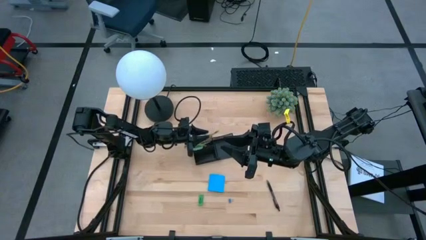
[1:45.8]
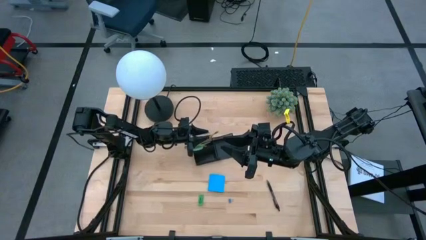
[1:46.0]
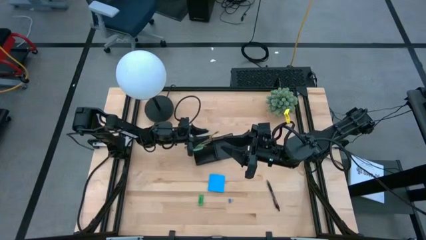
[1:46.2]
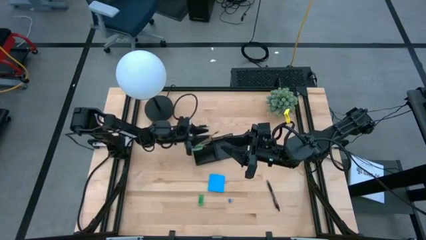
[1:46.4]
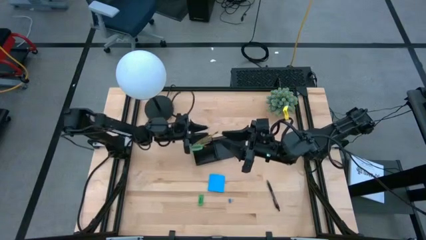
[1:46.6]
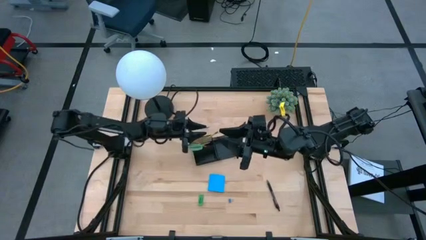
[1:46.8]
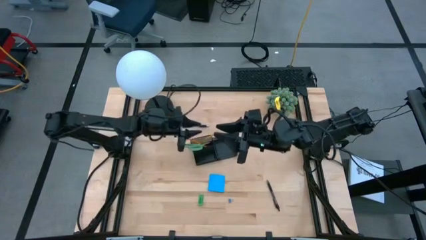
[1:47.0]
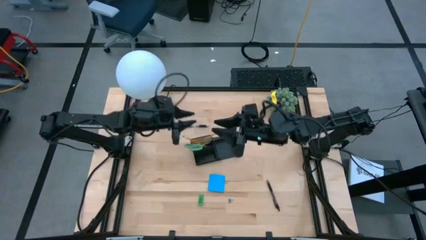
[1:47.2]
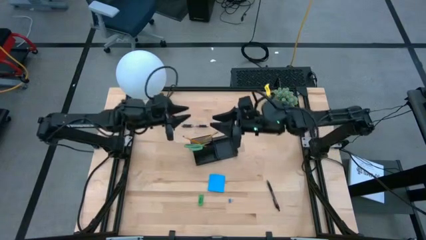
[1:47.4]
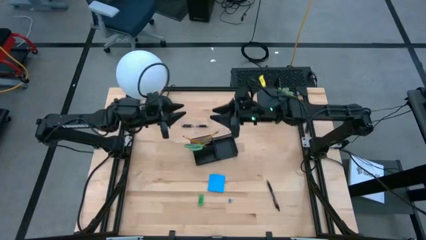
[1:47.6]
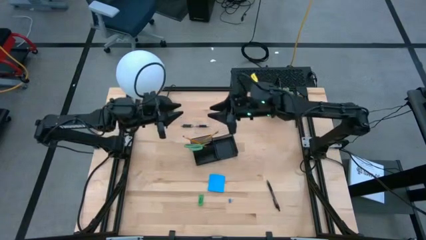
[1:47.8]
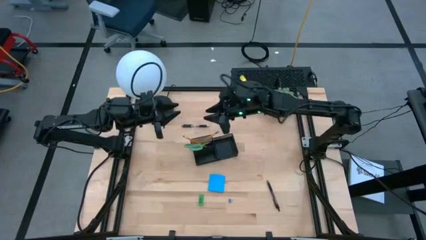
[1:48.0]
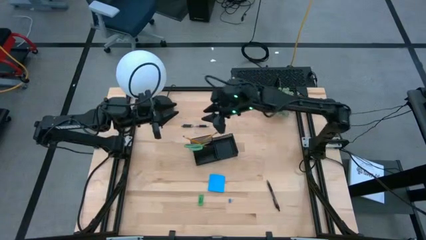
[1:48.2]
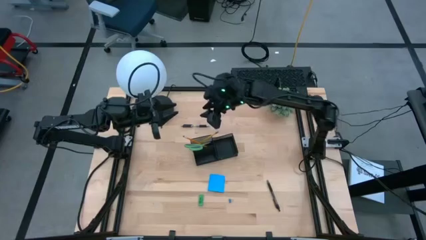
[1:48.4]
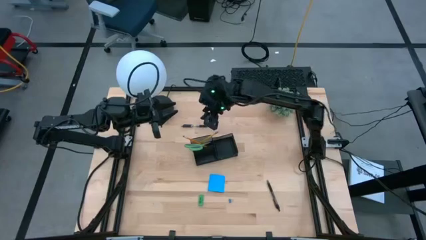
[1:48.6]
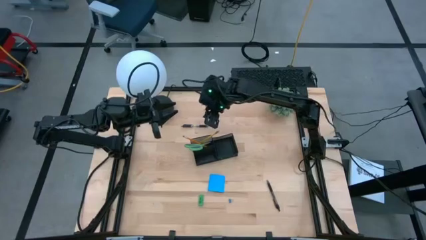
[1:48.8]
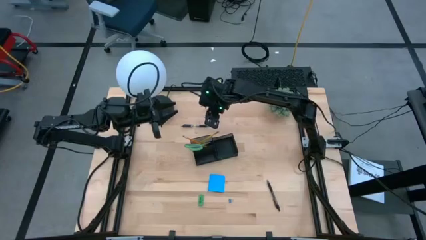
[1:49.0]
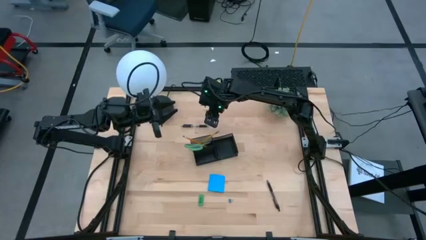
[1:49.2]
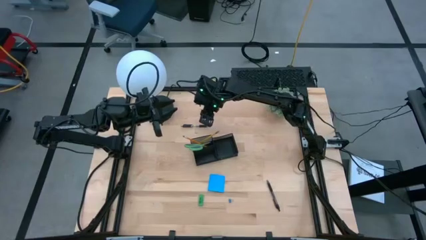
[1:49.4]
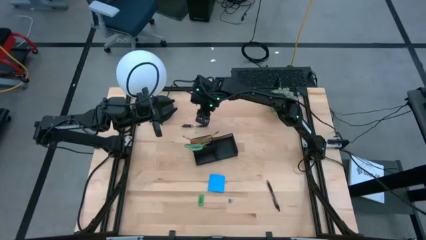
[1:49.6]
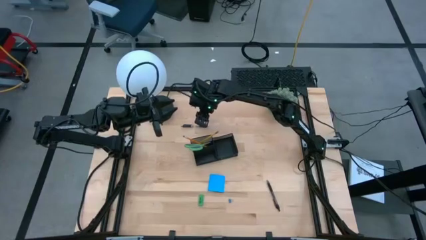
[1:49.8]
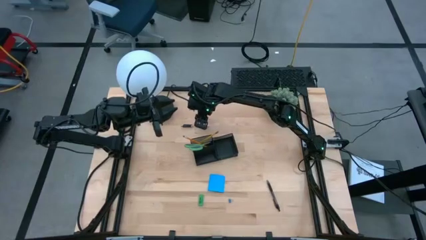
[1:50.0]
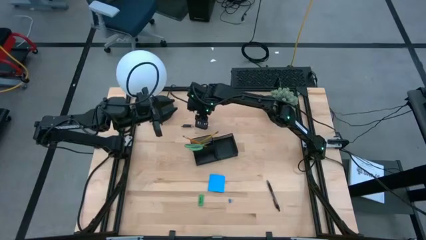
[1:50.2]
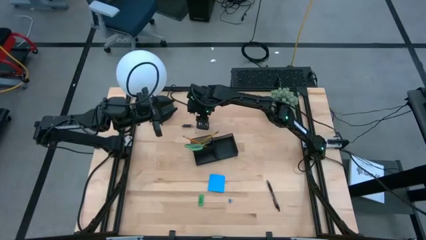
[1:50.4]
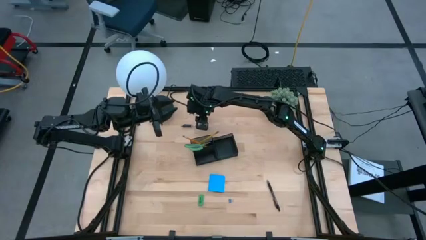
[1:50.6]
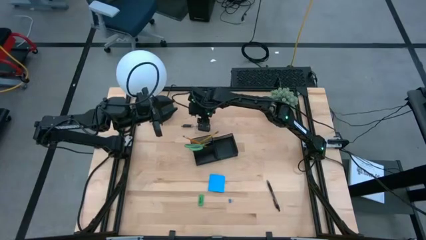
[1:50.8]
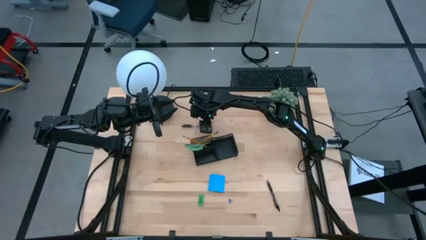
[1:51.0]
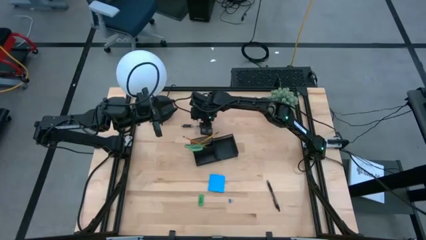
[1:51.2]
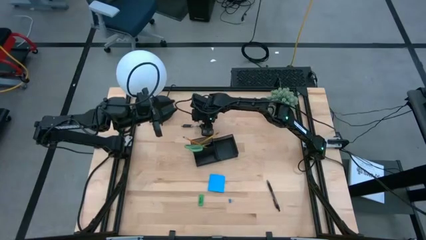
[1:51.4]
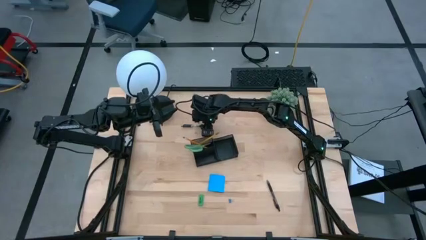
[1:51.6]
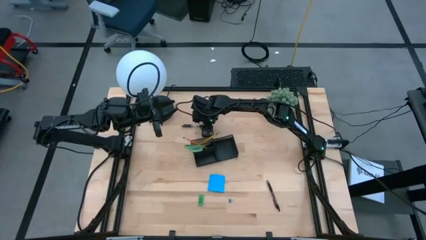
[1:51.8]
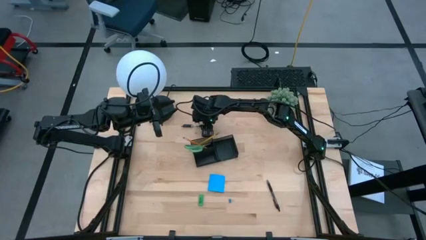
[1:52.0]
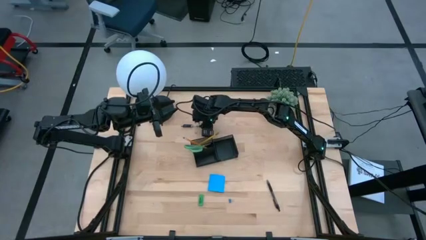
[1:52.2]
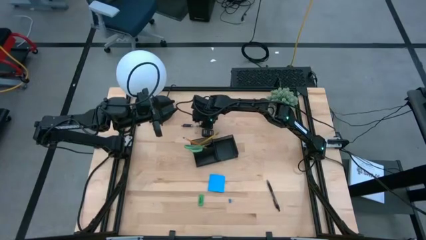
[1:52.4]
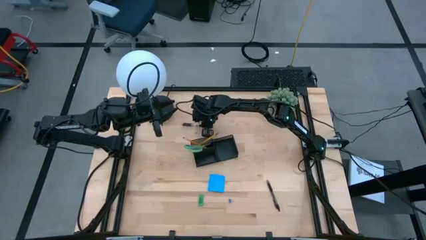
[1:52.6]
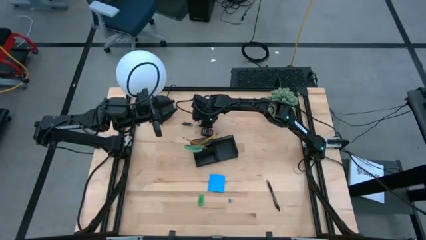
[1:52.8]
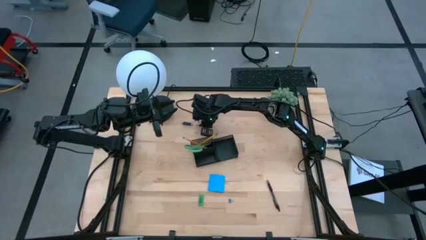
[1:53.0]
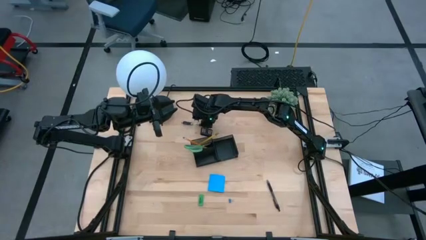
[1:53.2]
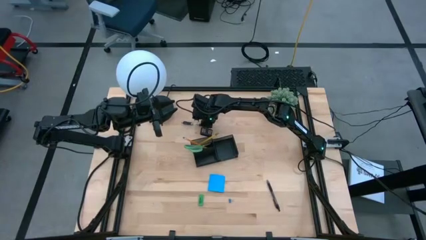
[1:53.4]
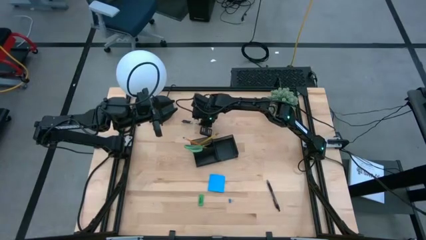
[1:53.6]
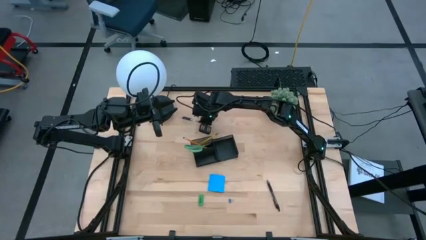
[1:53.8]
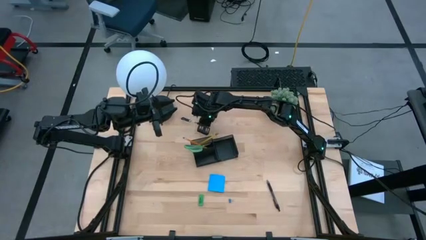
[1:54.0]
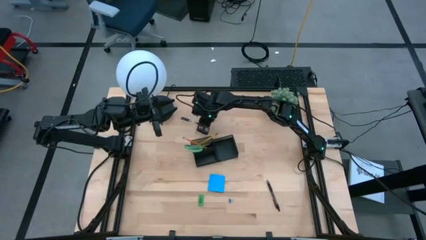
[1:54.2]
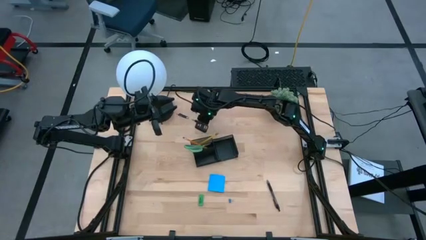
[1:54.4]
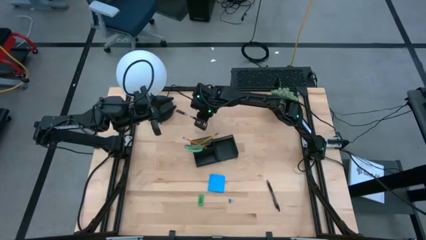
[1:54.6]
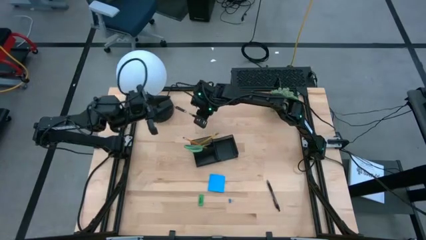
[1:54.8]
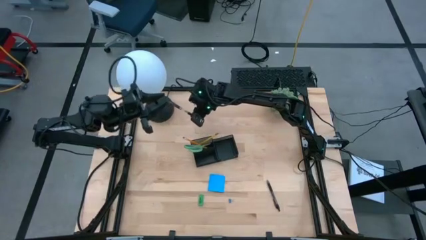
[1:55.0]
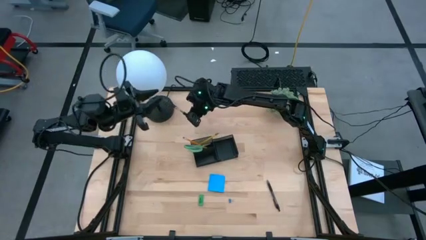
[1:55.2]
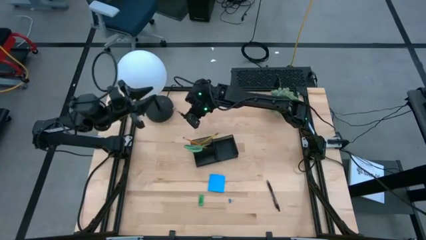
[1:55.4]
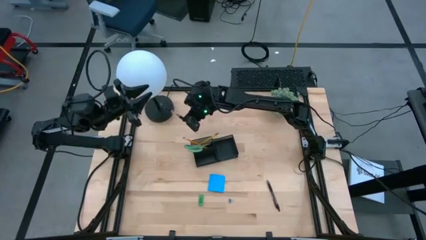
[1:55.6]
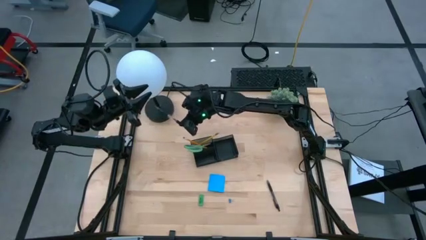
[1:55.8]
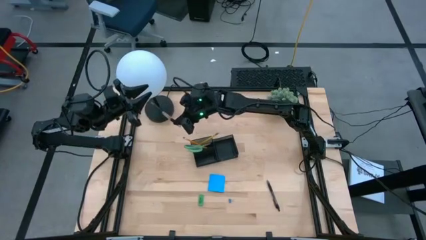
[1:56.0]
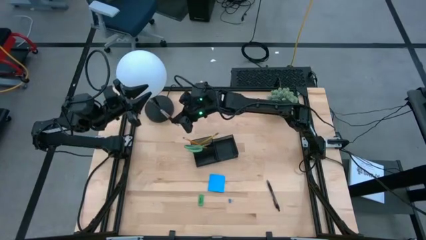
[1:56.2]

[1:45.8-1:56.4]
Task: Pick and place office supplies into organizer
Put the left black pen into the black desk organizer

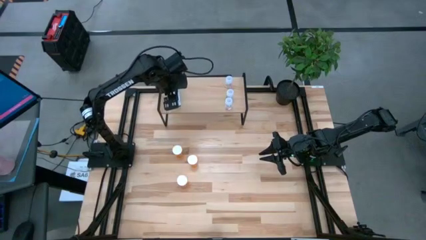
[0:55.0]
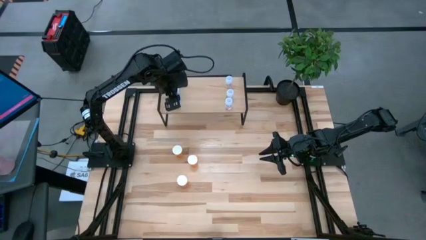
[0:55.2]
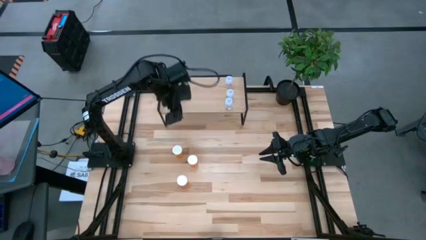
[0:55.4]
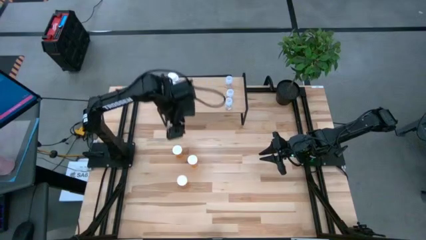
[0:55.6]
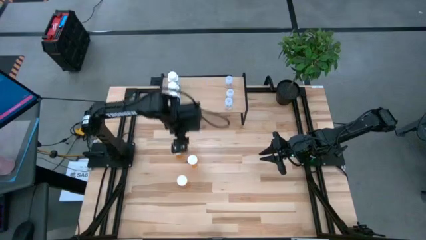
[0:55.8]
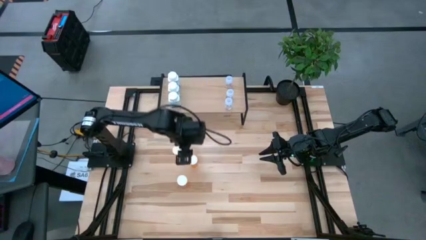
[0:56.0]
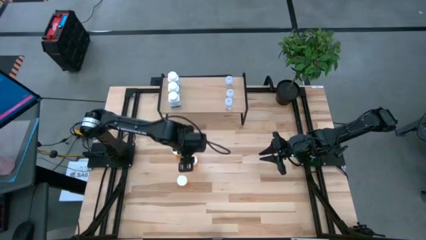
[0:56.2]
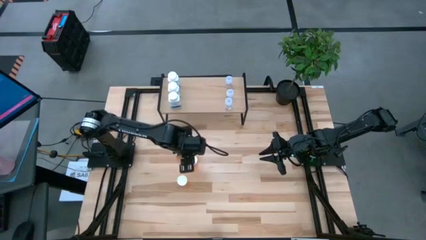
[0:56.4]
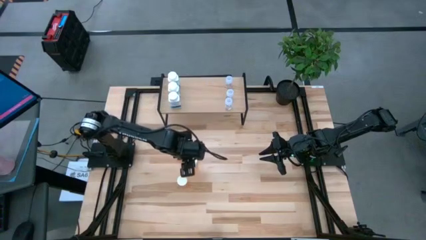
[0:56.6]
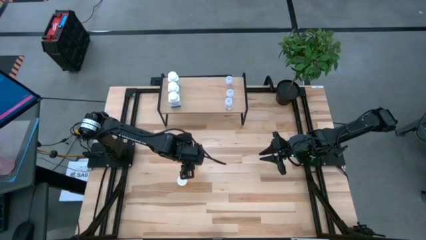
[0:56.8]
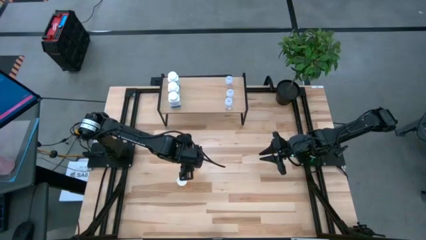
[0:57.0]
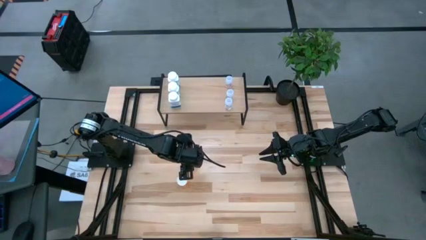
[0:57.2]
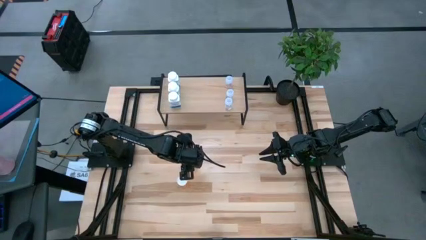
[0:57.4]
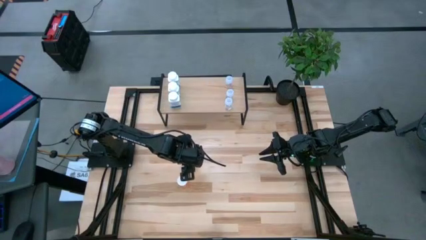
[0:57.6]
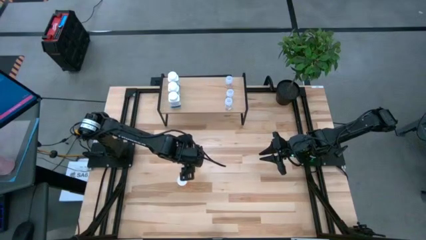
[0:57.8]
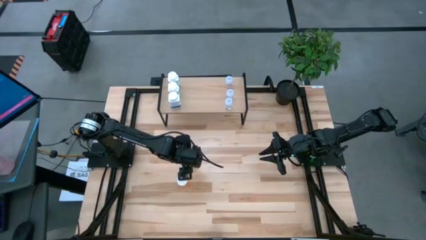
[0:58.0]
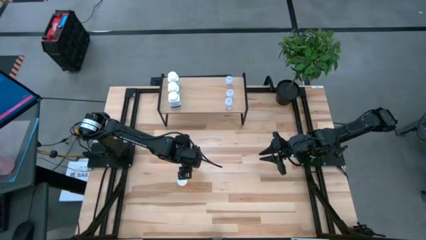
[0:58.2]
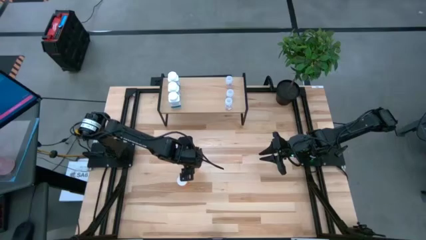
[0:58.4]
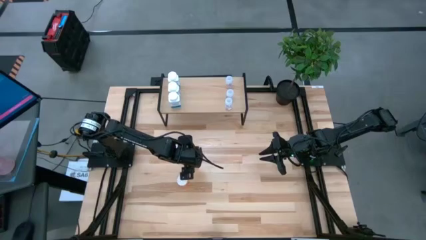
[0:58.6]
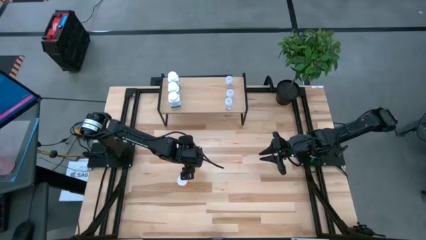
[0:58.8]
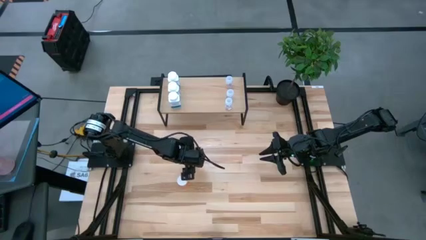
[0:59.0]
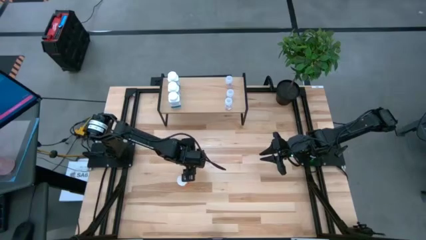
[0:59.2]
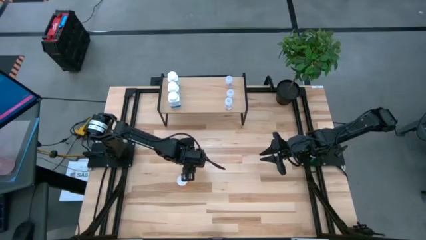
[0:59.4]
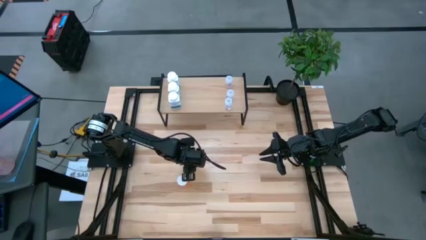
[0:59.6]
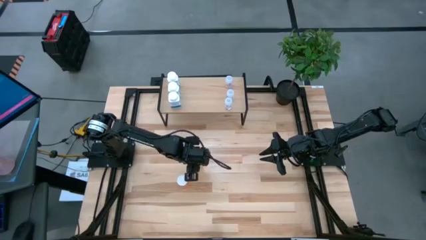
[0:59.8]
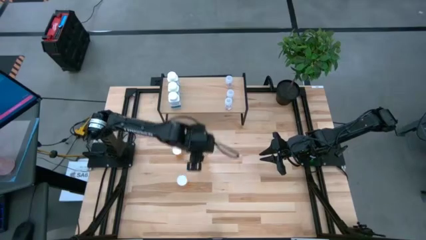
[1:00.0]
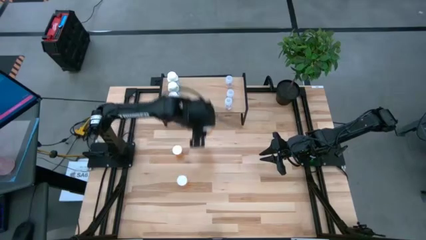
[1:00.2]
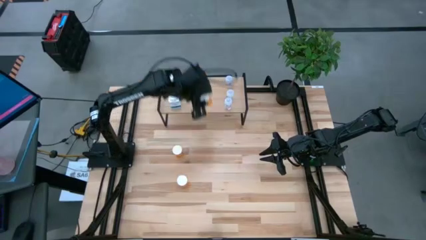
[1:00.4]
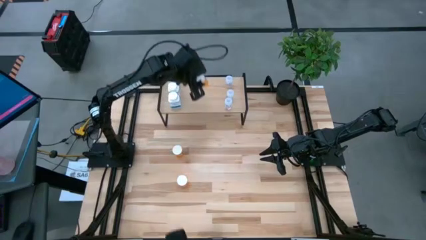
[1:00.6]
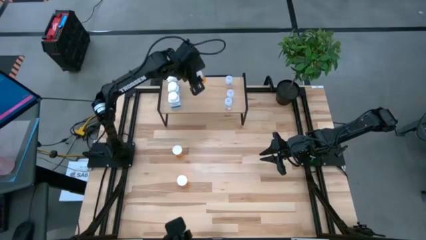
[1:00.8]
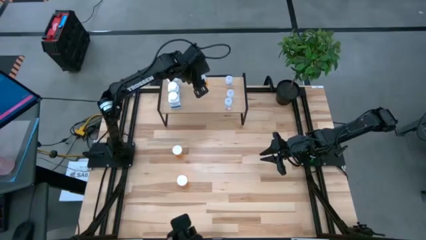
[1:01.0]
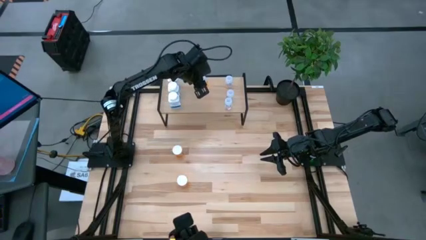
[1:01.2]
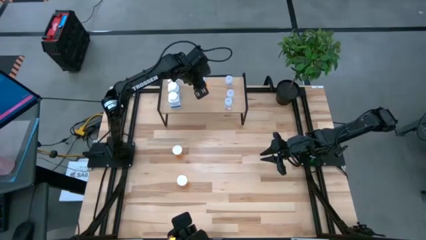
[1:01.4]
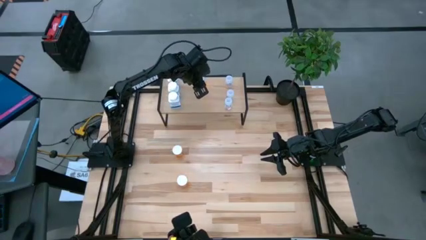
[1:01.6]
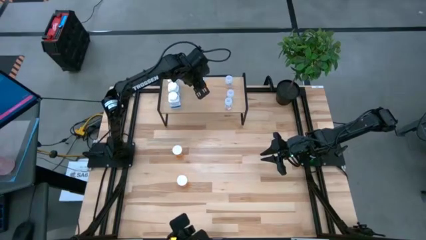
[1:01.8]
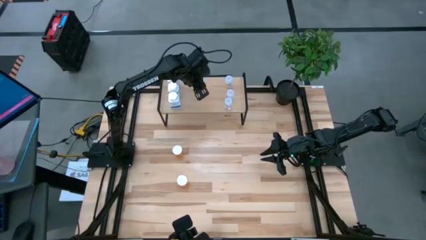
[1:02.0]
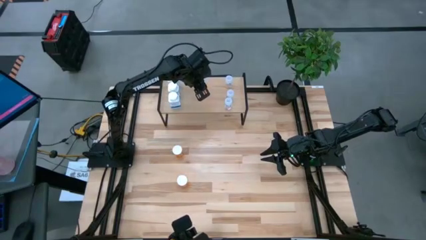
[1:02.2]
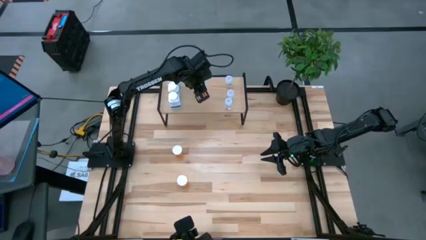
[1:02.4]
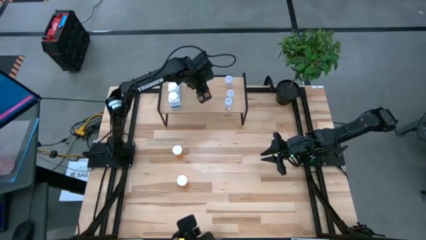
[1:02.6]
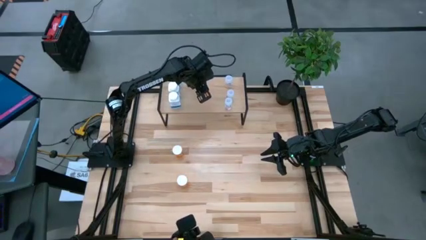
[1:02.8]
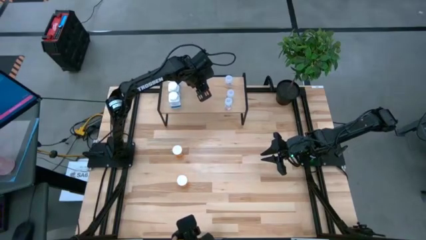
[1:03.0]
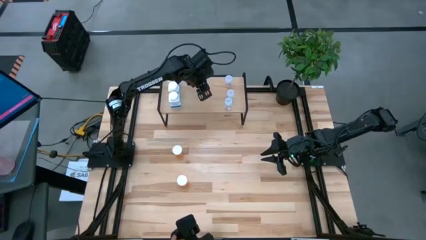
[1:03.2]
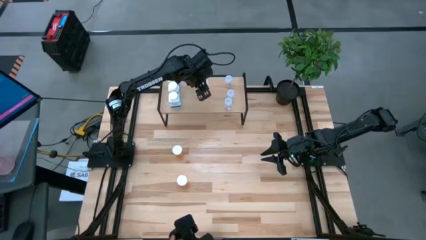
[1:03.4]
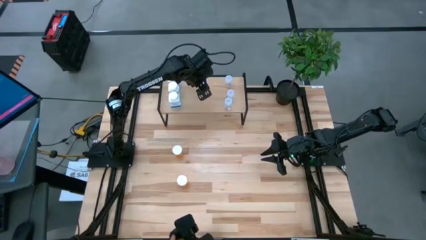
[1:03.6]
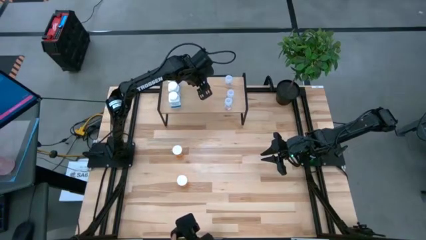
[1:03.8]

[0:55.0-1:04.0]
Task: Pick and place medicine bottles onto shelf by color
Put the middle right orange pill bottle on the shelf
